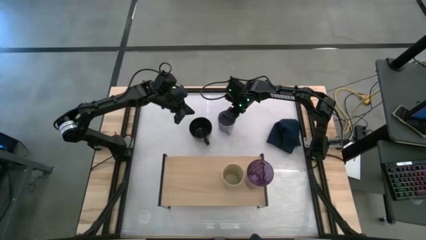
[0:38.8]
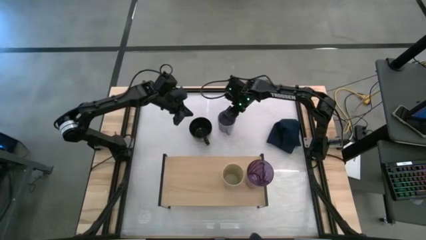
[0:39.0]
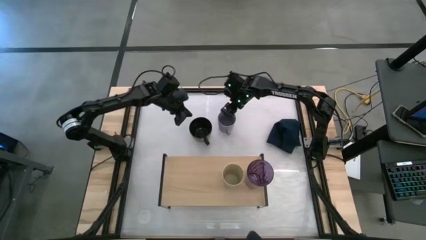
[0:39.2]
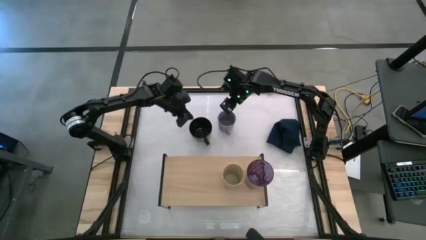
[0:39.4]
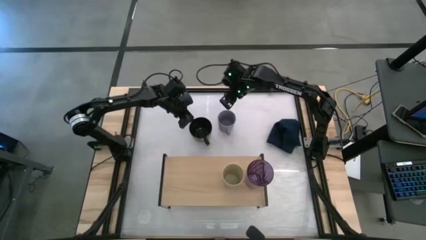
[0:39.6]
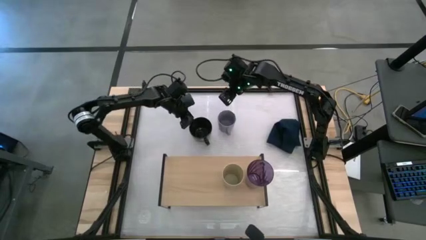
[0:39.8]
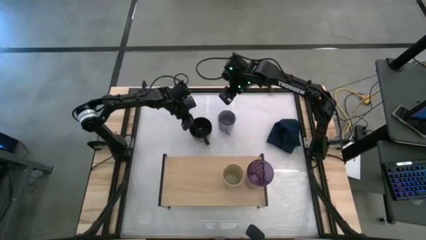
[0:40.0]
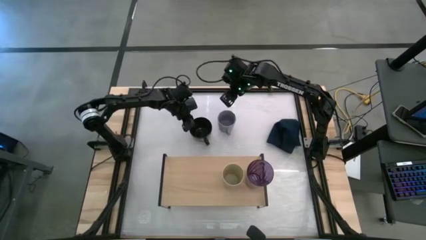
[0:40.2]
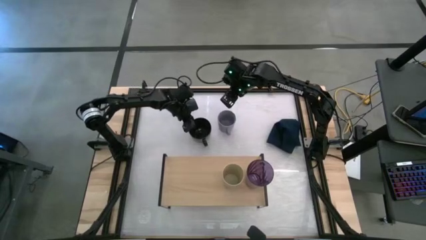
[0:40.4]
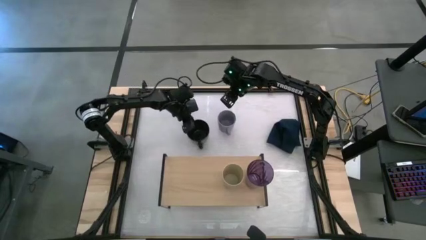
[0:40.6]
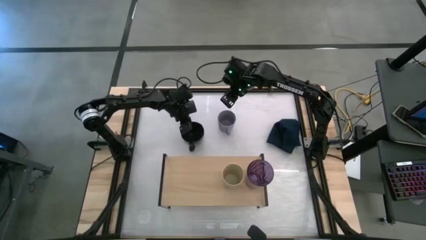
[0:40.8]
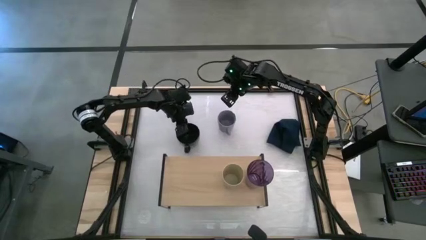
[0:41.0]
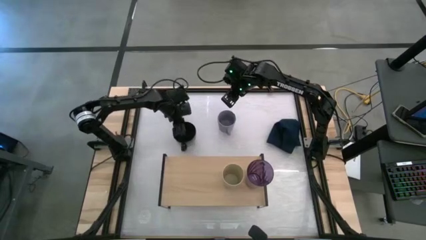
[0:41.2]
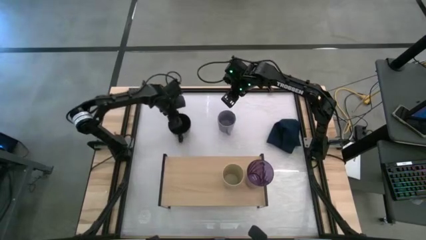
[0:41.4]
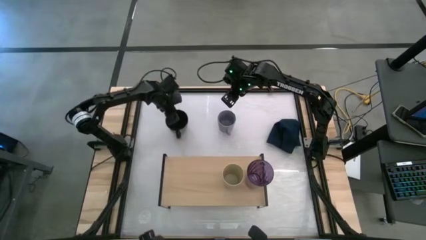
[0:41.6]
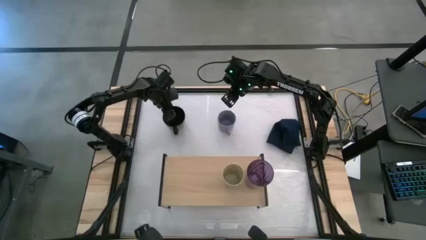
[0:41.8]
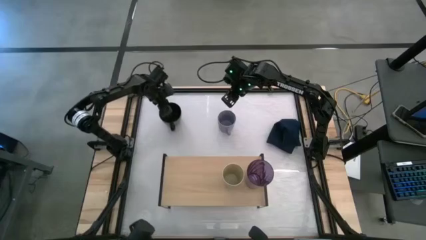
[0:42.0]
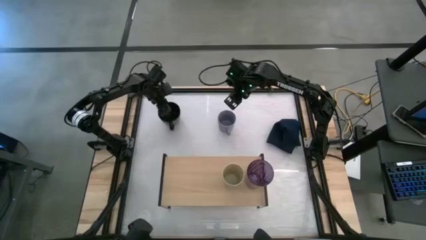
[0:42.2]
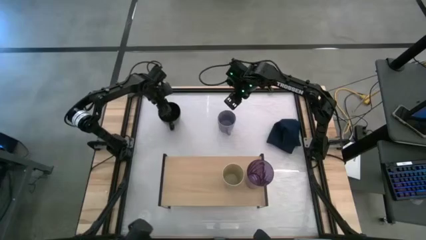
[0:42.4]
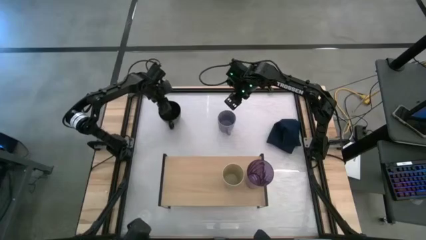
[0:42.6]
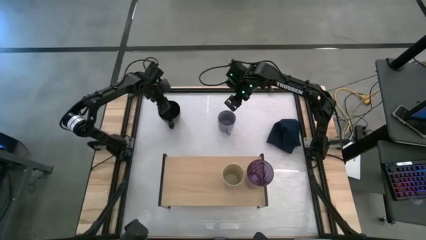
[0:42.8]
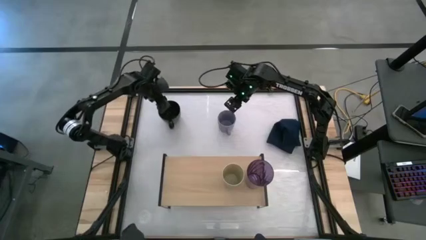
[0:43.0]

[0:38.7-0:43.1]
Task: Stack small to large cups/mugs on shelf
Move the black mug to the top left of the table

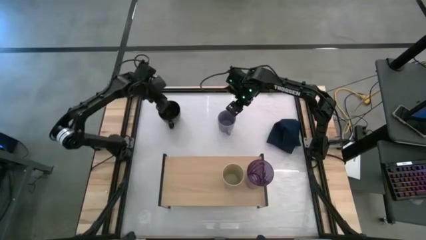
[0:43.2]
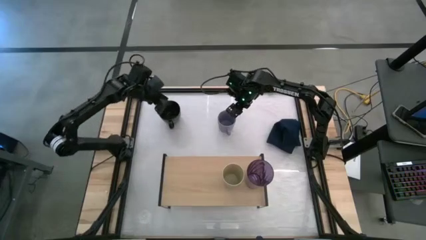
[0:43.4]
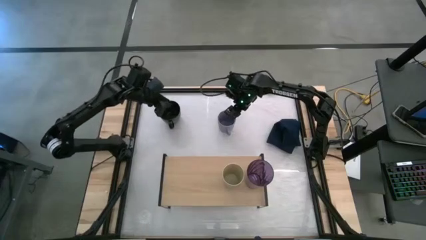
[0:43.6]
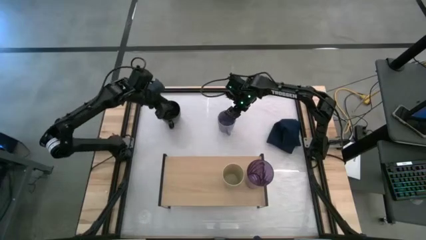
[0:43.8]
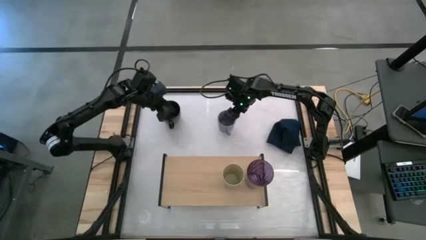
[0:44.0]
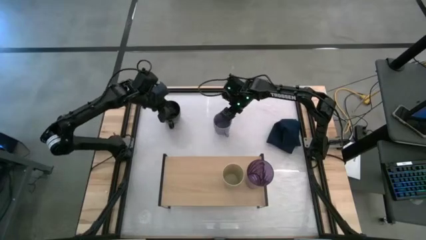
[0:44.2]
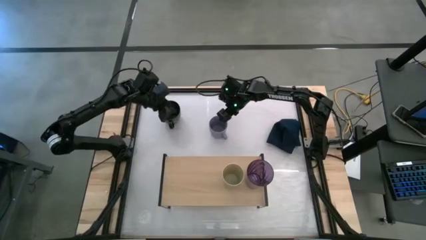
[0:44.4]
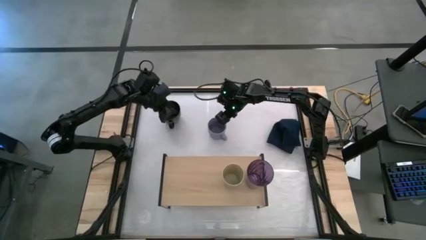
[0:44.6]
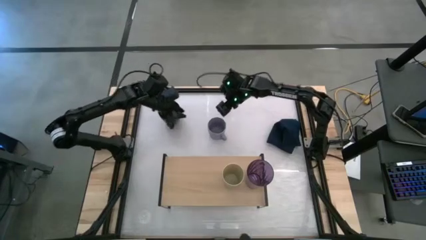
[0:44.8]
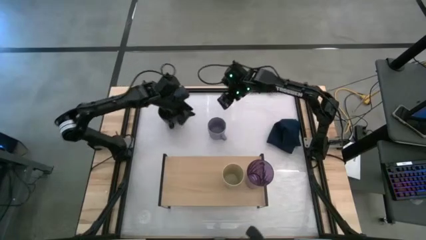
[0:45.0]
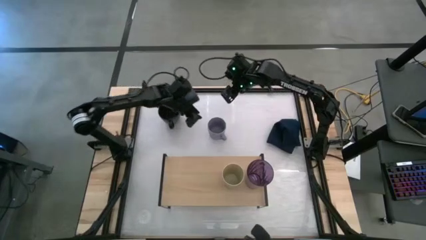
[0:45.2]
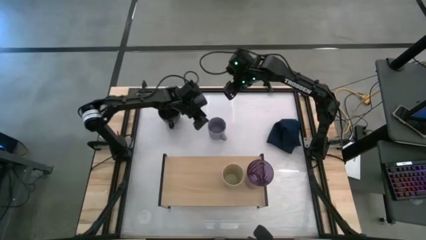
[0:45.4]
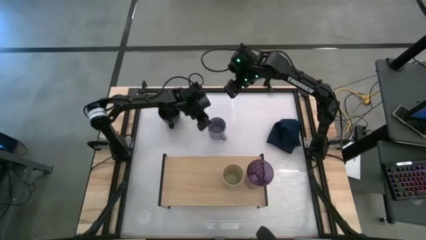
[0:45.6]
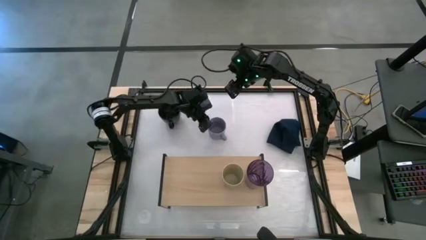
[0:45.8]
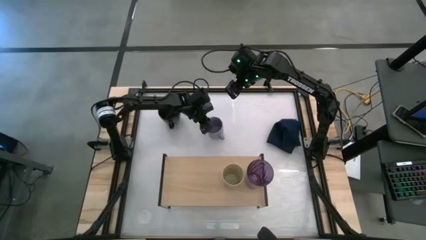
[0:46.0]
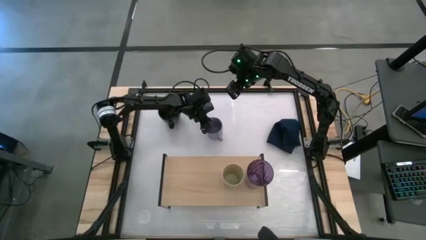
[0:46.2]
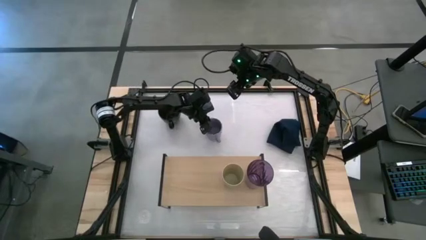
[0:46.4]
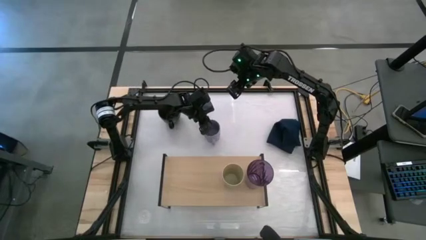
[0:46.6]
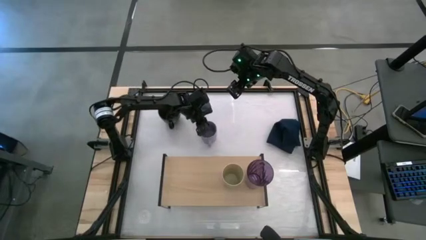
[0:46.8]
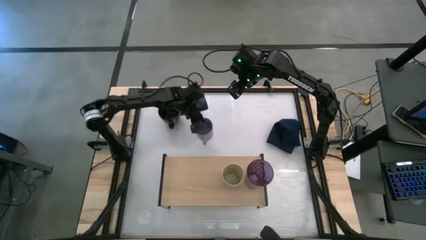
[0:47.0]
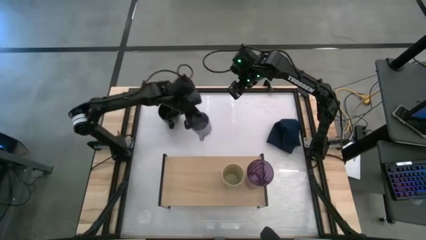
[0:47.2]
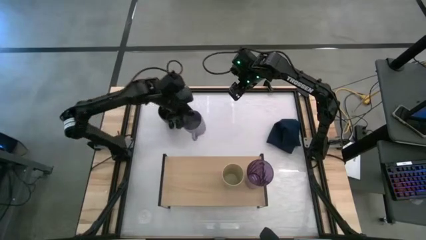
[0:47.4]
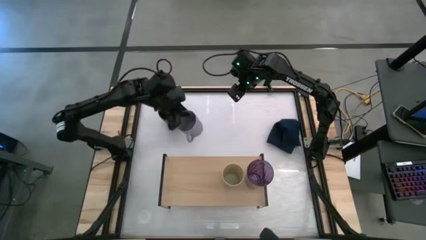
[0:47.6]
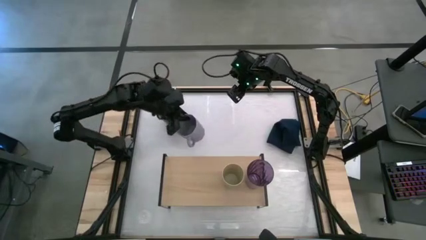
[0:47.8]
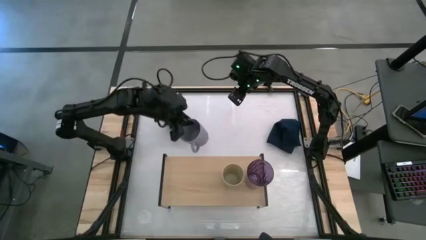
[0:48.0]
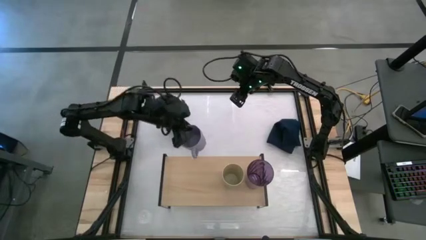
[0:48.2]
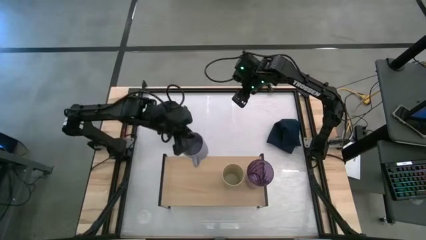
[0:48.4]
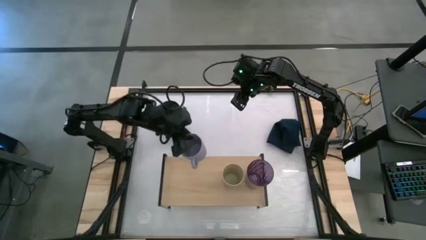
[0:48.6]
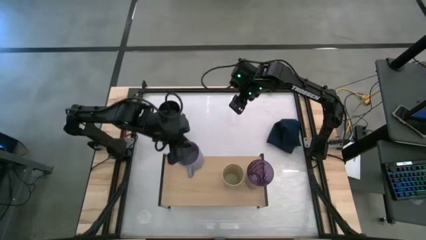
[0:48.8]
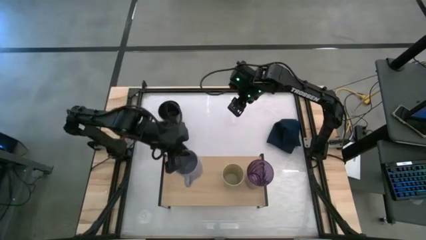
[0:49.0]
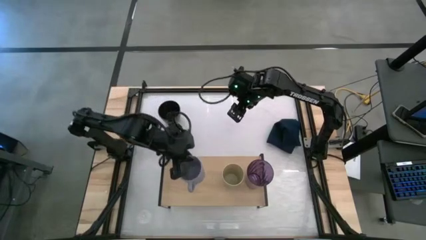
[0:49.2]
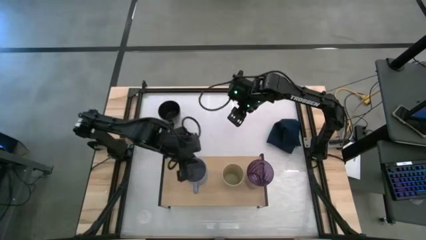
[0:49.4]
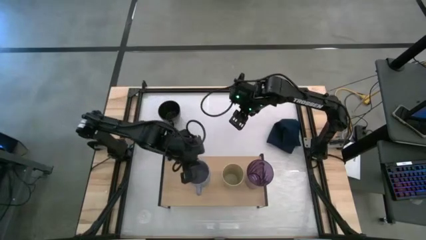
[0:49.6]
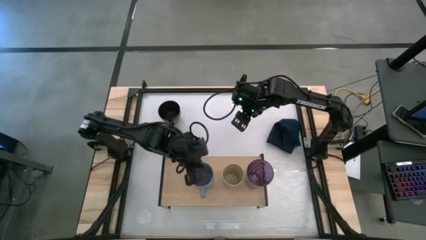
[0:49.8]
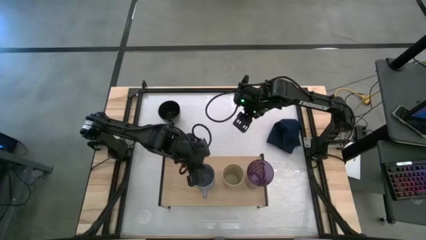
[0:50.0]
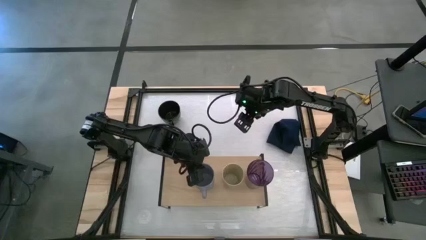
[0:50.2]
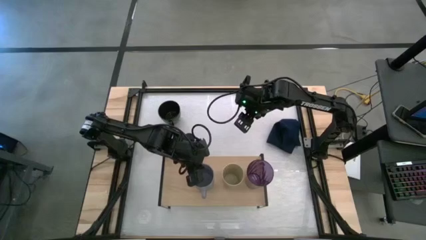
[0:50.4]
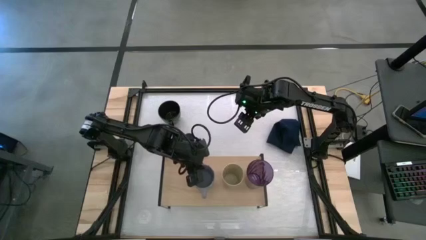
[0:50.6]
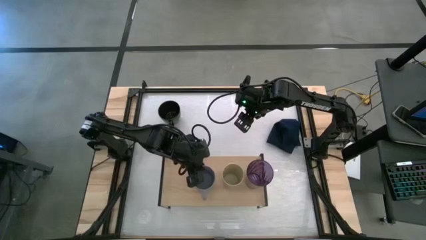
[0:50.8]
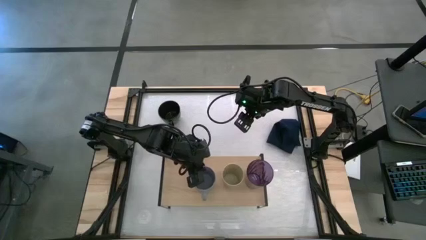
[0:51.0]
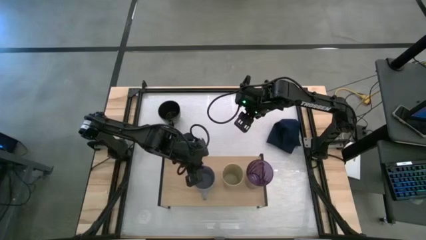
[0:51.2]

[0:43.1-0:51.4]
Put the gray mug on the shelf

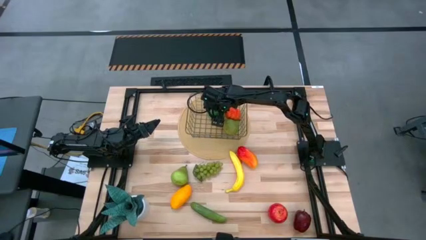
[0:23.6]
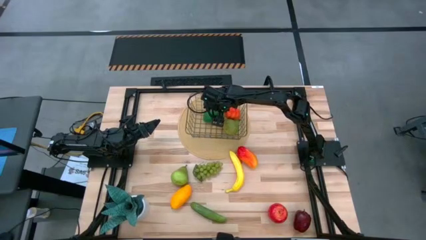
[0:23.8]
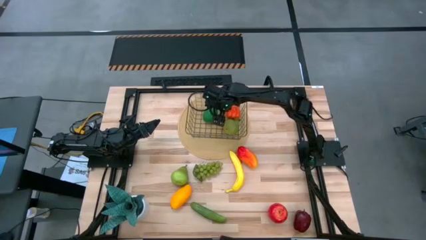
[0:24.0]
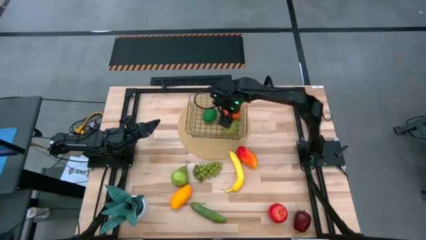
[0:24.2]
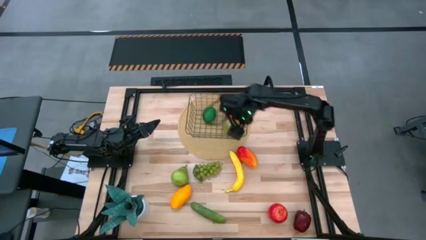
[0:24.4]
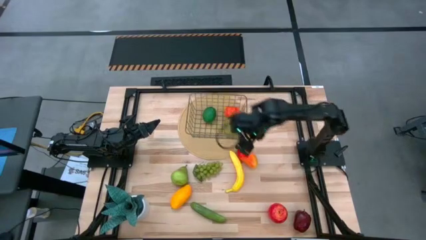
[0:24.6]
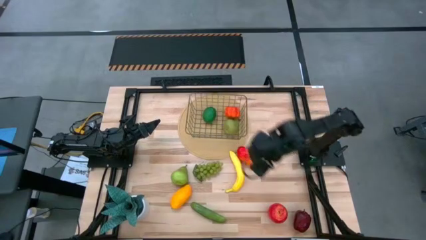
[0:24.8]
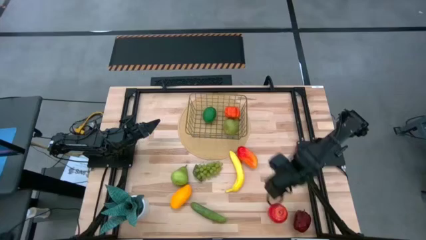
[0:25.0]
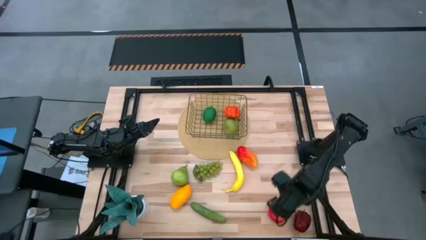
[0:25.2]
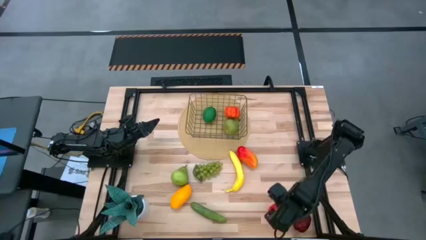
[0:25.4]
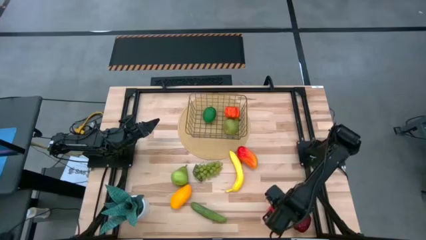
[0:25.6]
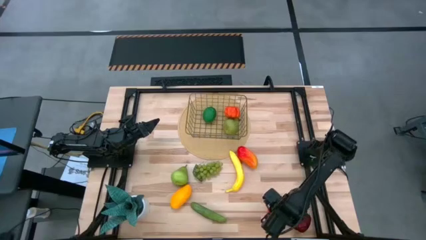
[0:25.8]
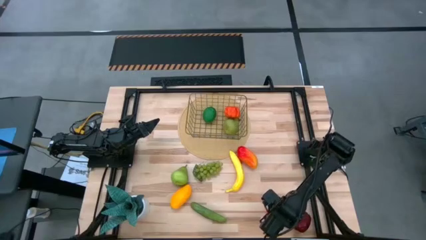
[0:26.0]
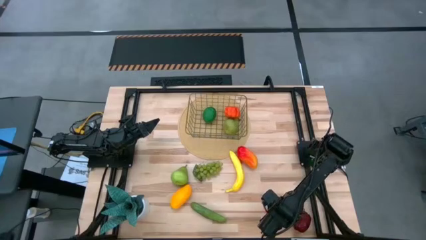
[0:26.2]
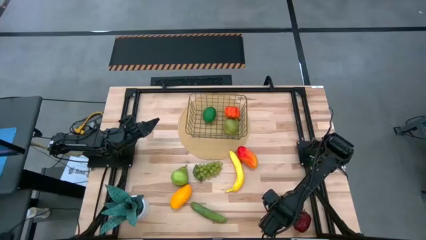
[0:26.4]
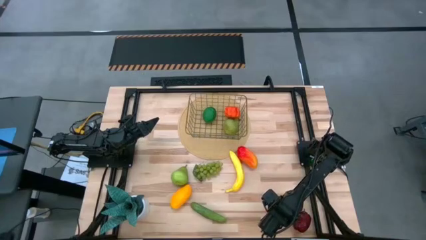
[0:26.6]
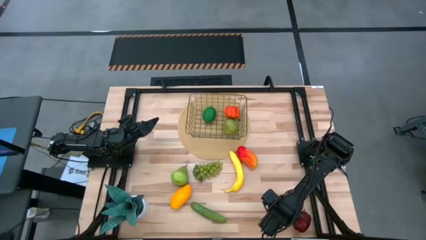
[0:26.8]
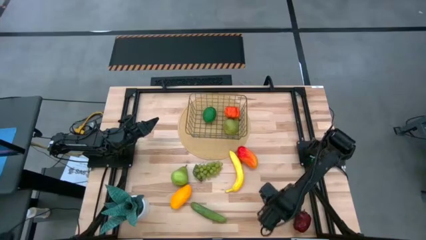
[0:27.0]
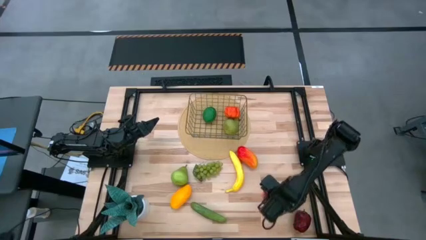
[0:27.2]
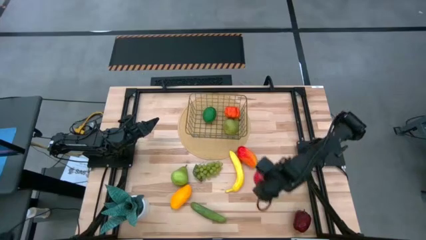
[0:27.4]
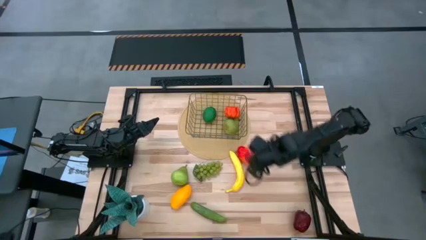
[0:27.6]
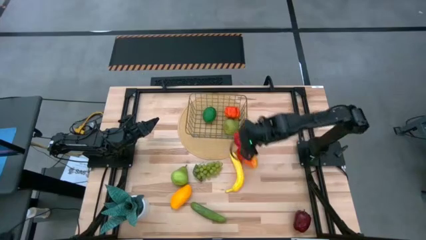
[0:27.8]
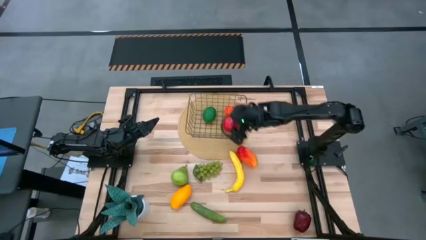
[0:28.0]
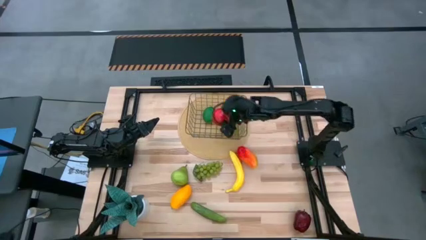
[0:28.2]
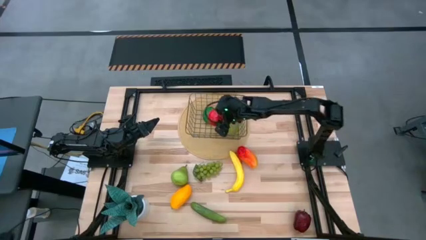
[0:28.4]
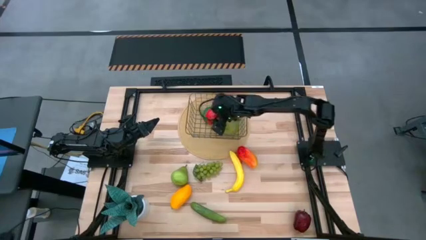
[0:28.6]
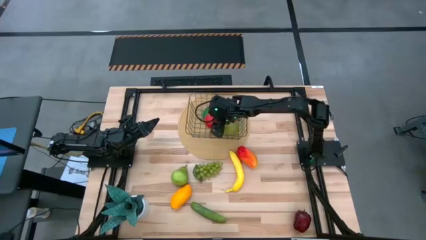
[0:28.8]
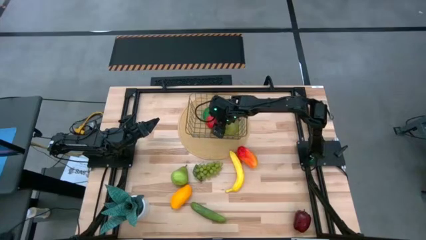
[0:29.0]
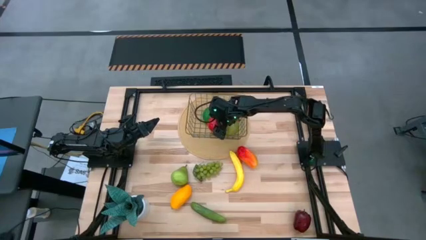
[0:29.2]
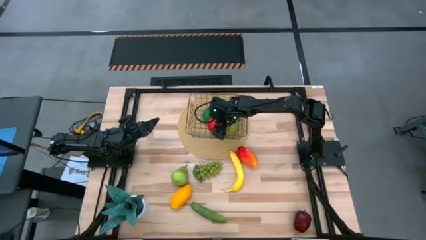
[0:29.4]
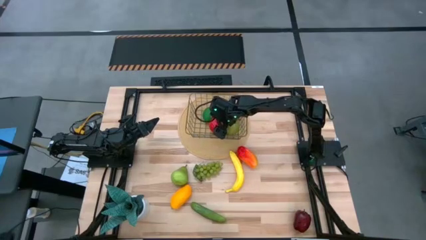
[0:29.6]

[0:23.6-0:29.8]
Task: Build produce basket
Put the red apple into the wire basket
